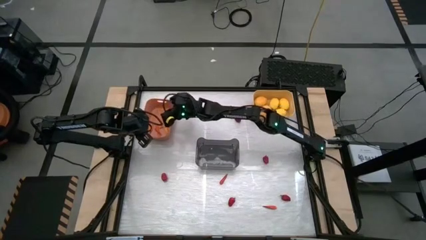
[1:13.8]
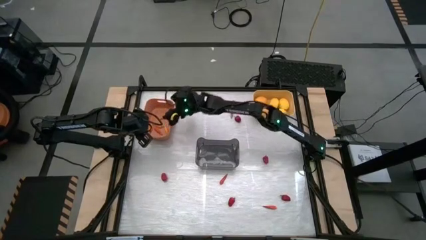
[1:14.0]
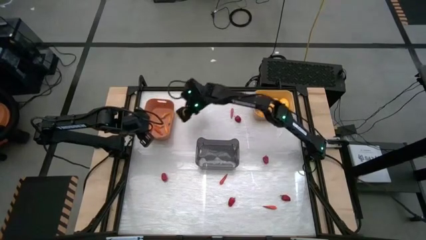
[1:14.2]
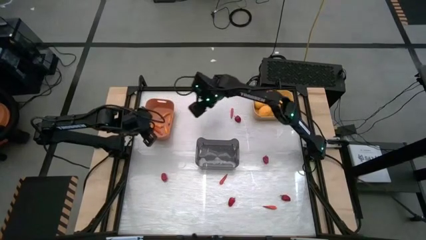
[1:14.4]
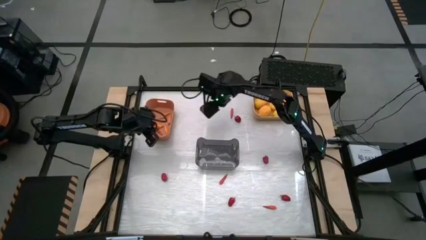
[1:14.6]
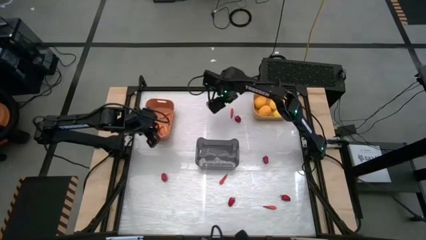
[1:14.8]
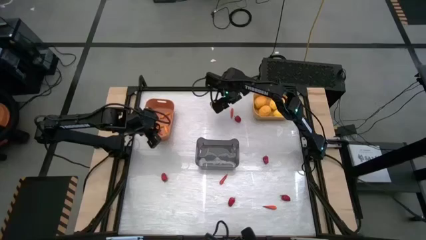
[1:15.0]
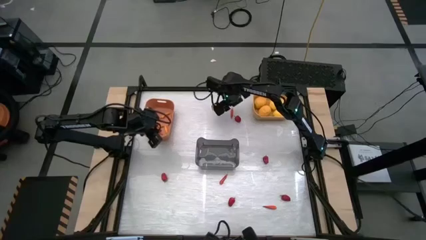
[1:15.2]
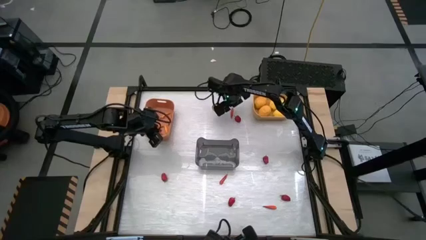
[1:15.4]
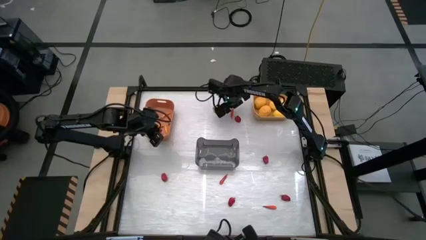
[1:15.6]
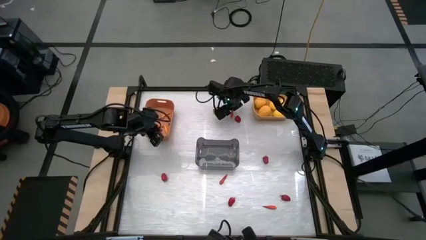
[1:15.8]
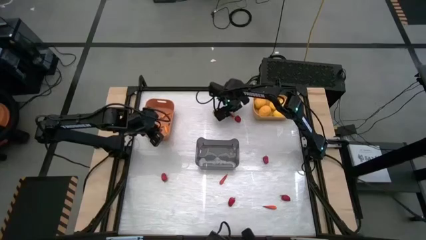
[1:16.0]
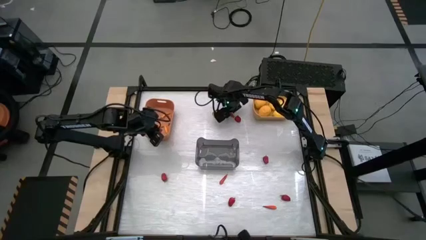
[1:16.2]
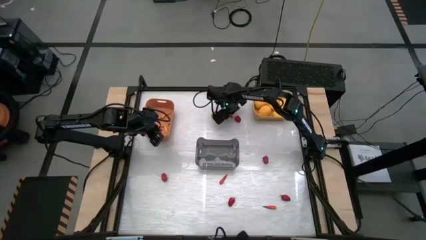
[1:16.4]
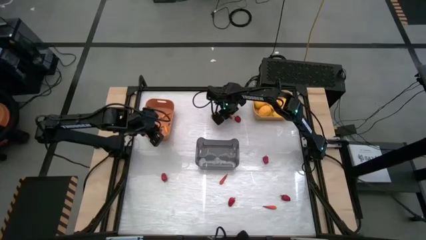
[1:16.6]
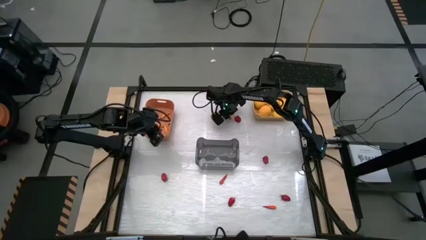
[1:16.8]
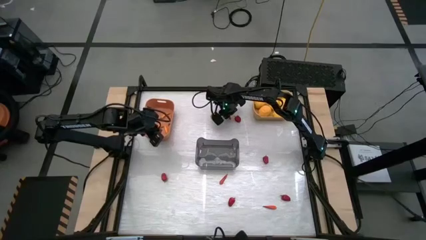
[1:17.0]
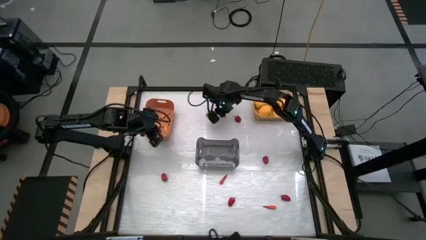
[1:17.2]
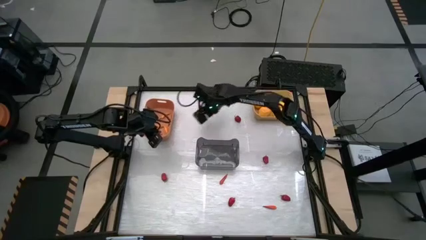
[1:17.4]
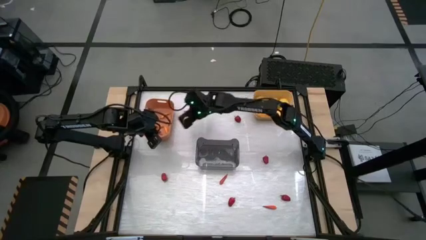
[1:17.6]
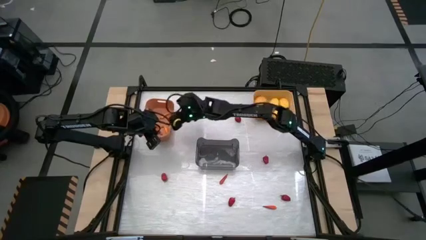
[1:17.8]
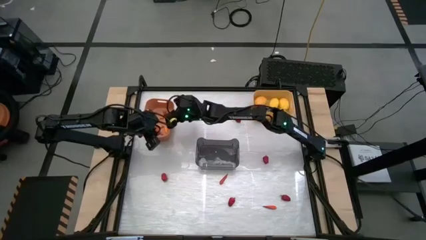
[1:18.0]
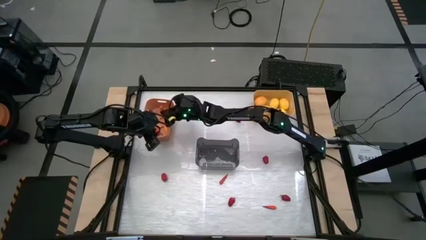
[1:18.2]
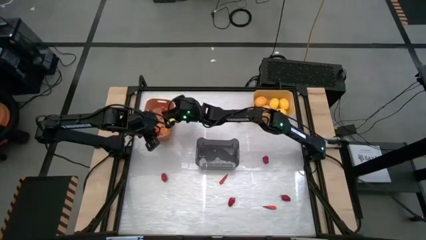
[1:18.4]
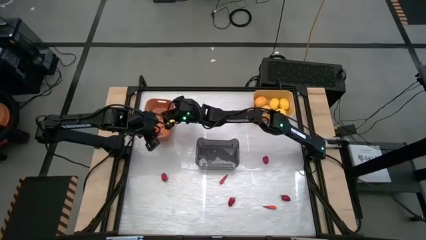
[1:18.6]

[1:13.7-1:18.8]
Task: Sort produce into baskets
Put the orange chili into the orange bin

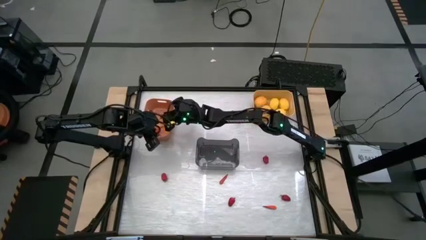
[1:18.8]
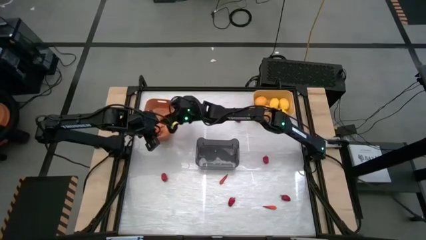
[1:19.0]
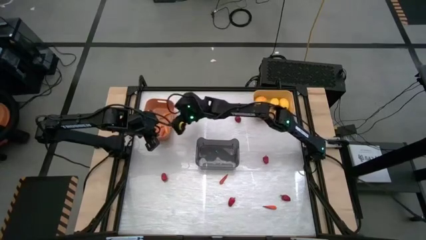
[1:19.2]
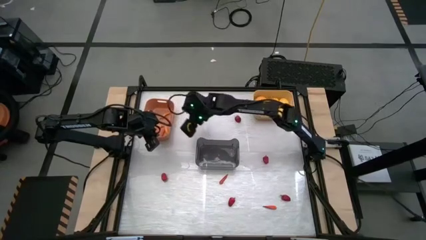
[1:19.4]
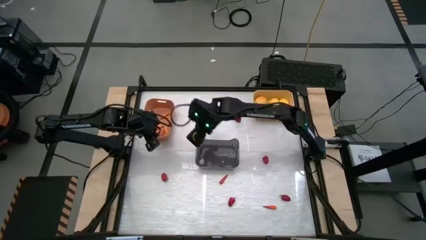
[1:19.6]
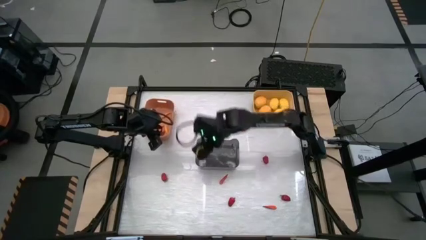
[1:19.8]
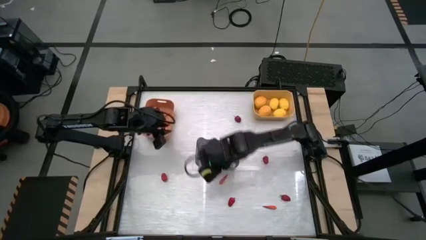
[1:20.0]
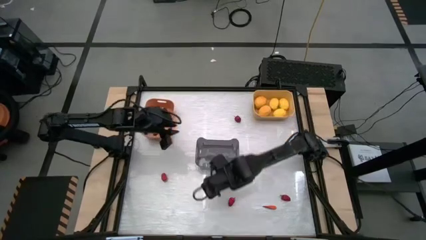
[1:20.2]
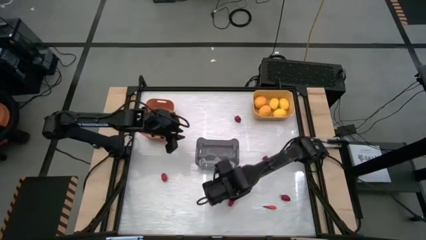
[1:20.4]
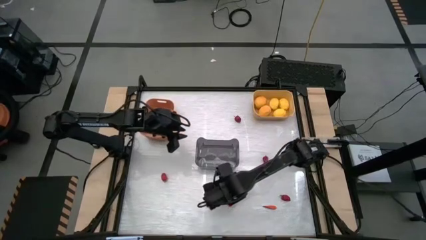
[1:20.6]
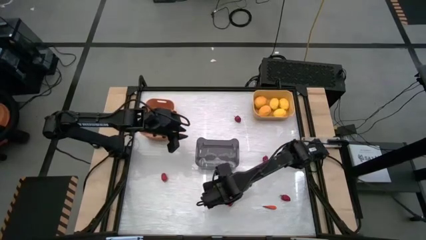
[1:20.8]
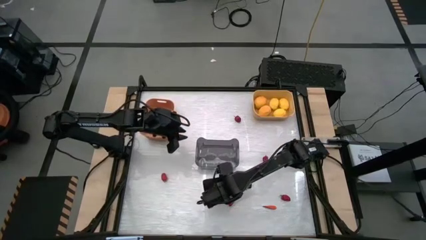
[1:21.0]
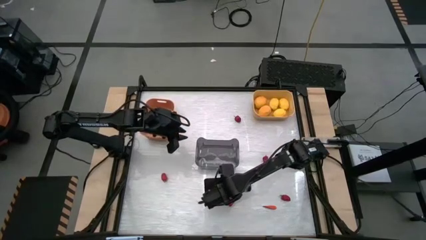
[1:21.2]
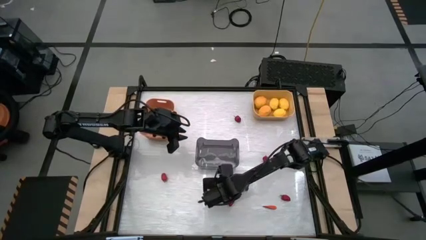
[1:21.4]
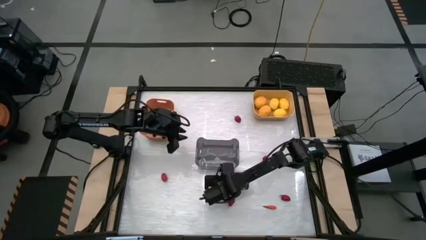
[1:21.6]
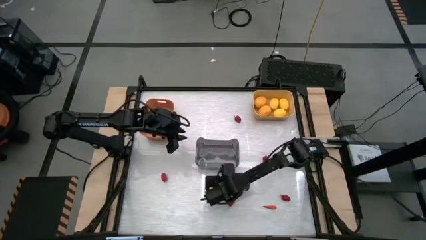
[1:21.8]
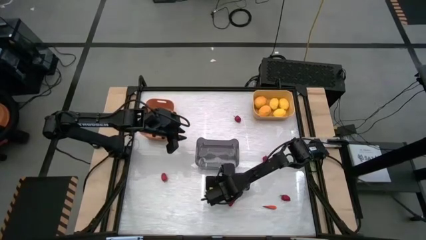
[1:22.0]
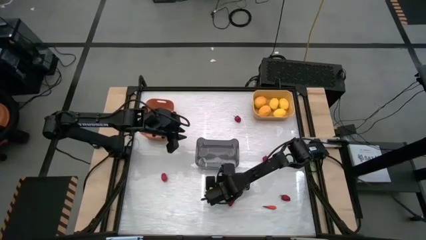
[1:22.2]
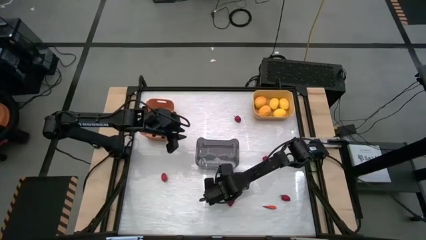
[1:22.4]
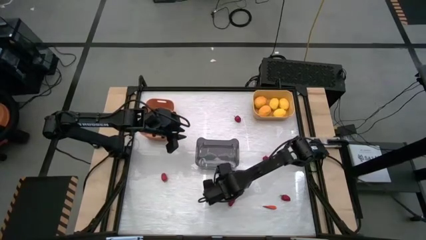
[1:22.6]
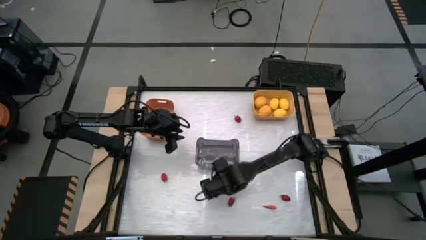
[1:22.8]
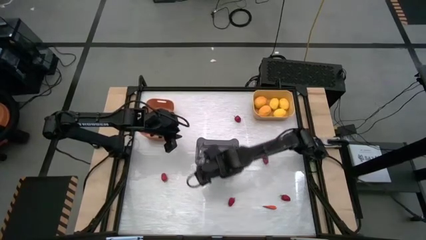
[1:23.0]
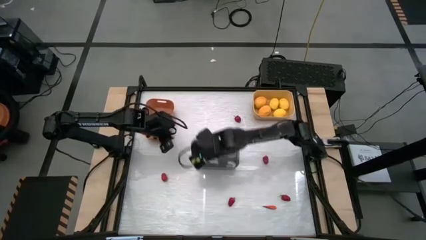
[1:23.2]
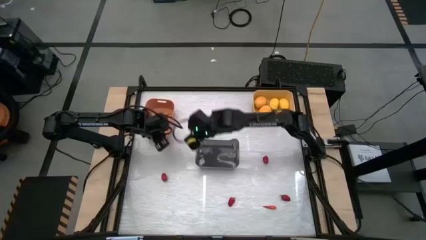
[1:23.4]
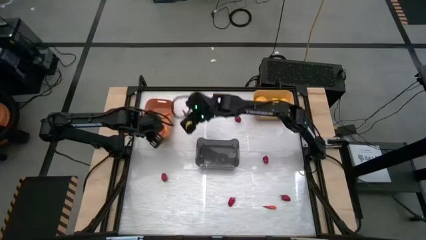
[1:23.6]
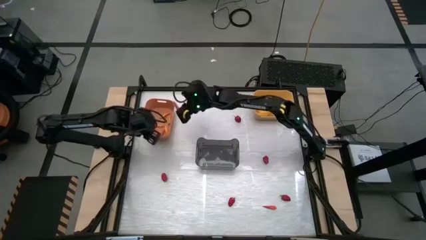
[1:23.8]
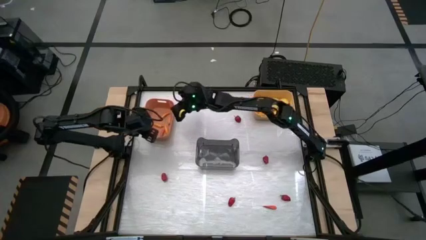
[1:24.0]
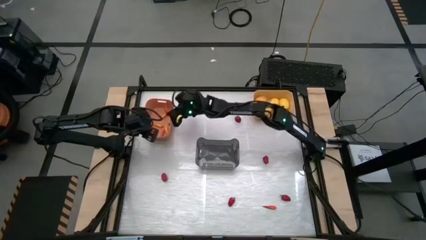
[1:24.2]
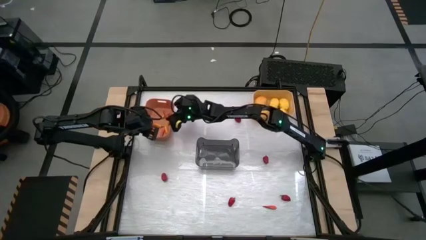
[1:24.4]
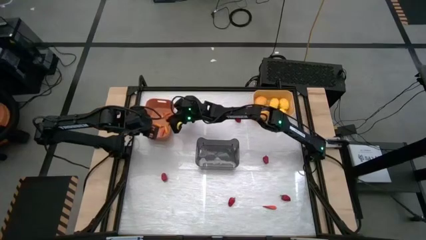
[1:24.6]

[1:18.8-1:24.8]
Put the orange chili into the orange bin

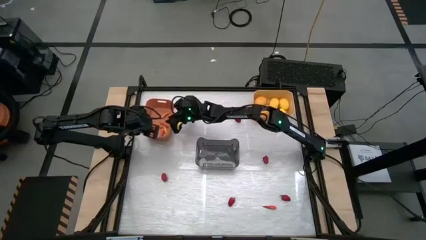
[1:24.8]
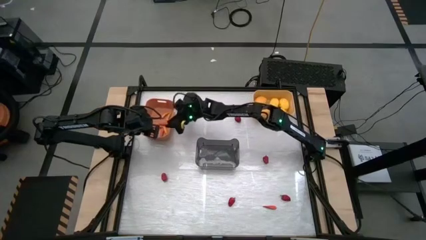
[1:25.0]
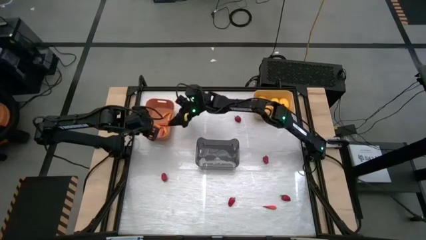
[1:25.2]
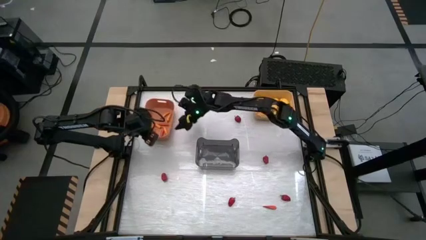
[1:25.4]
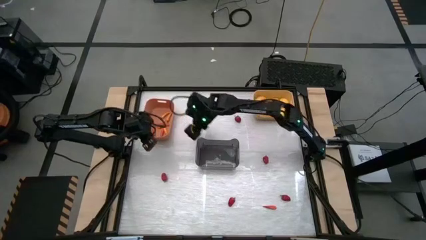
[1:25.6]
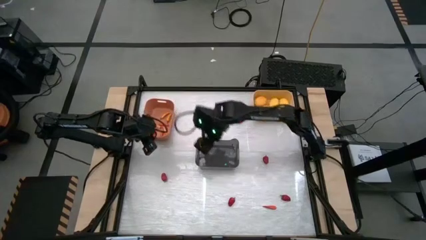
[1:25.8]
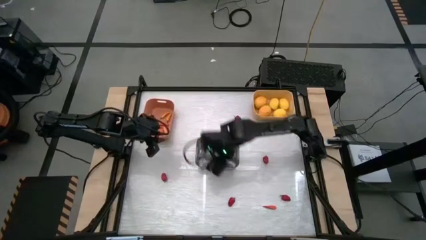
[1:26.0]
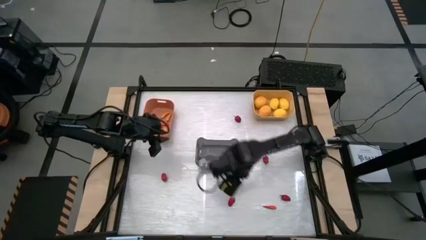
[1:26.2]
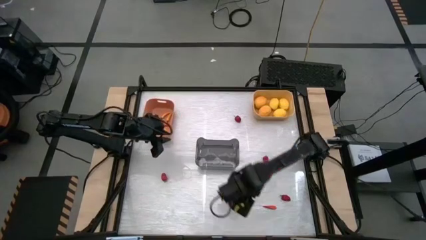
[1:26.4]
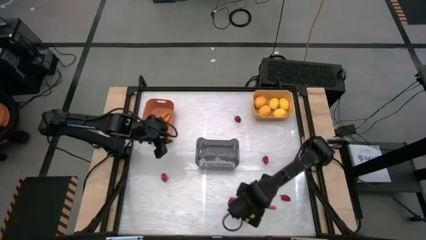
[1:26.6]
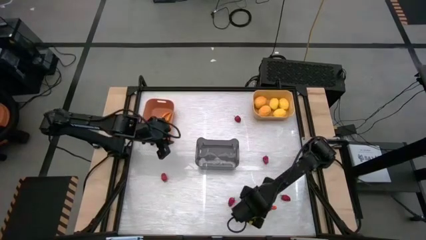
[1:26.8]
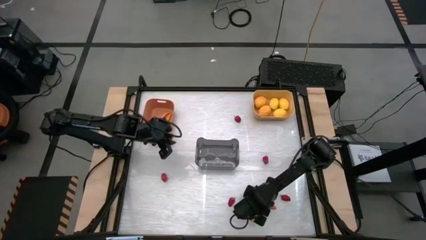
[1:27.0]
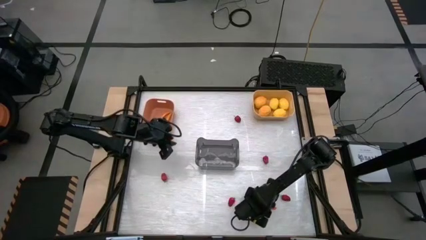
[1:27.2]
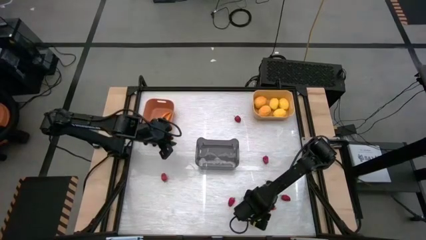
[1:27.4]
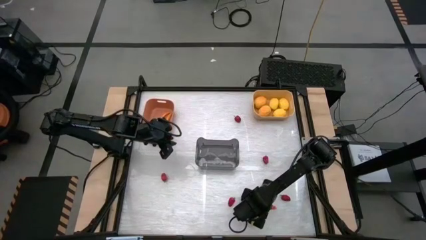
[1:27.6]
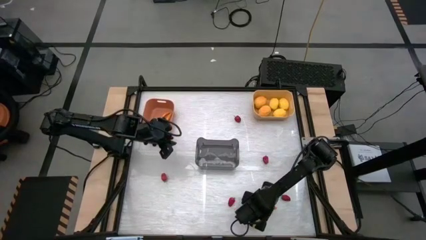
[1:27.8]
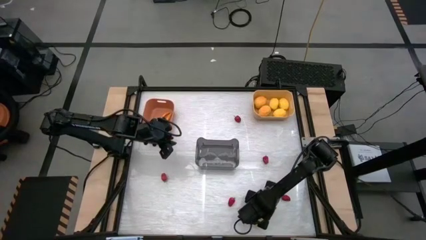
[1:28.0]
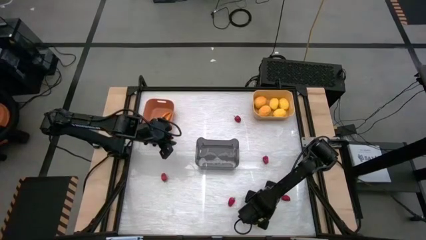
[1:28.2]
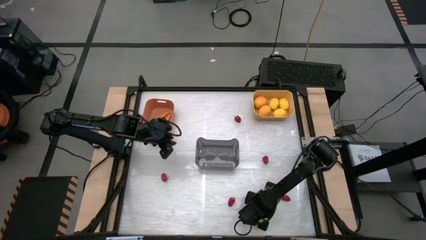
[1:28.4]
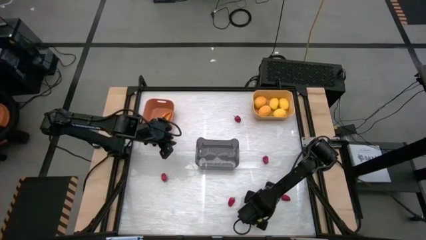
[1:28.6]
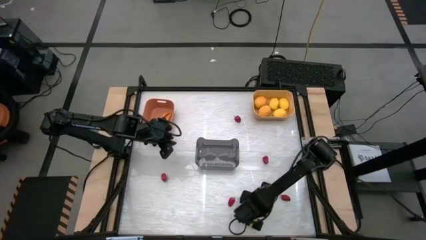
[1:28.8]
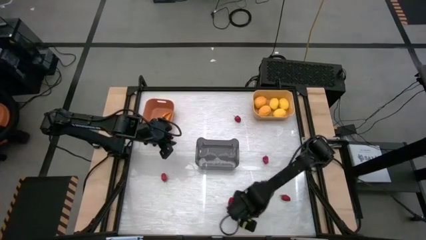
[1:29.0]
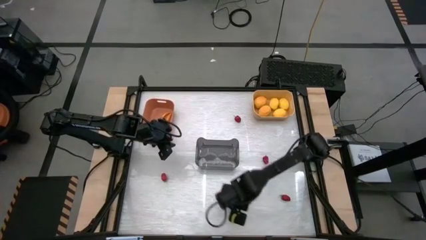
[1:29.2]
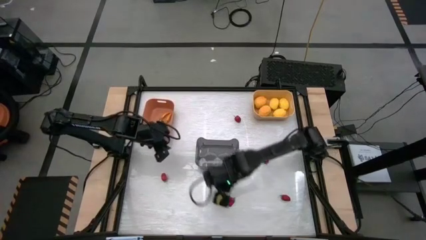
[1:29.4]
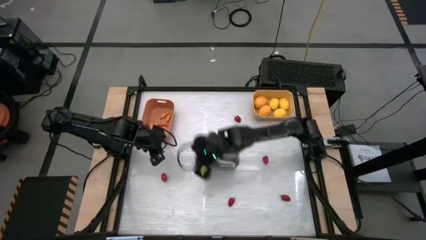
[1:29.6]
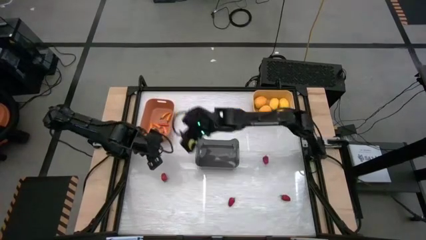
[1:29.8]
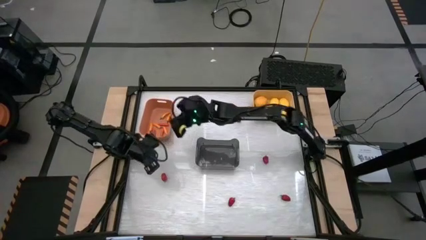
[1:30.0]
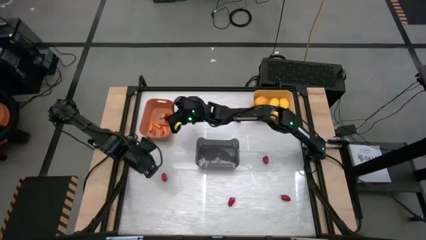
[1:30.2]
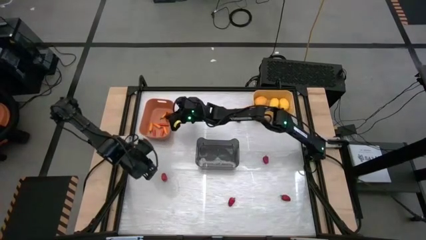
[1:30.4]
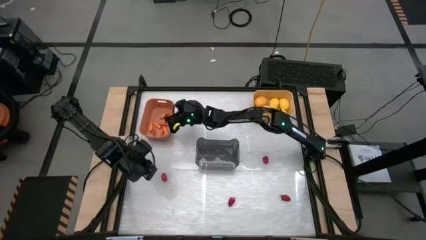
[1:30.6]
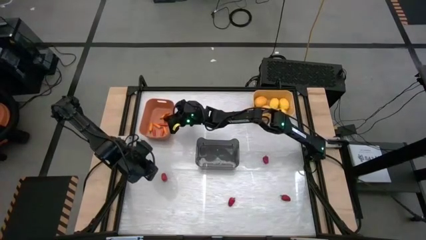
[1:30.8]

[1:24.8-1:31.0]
Put the orange chili into the orange bin
